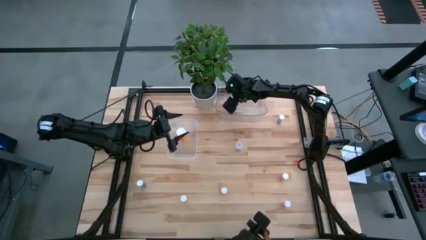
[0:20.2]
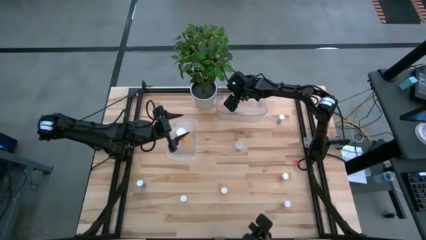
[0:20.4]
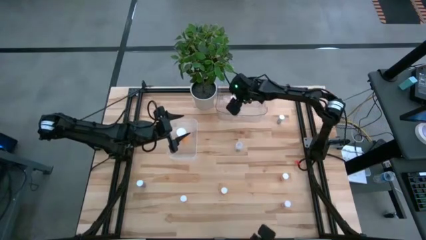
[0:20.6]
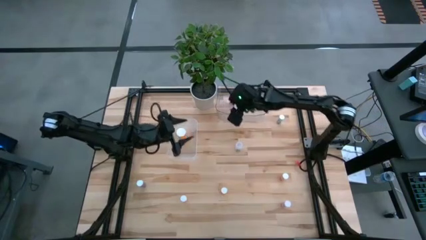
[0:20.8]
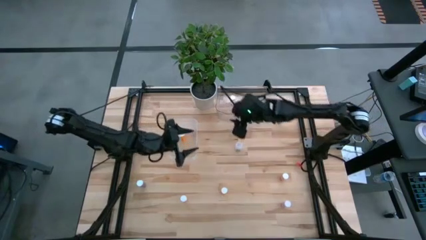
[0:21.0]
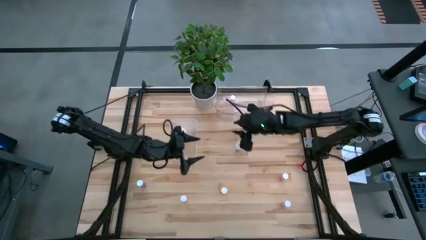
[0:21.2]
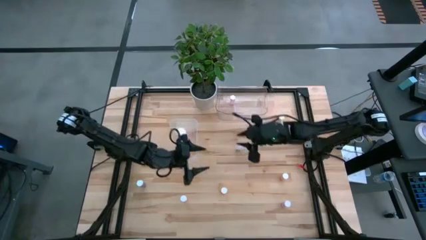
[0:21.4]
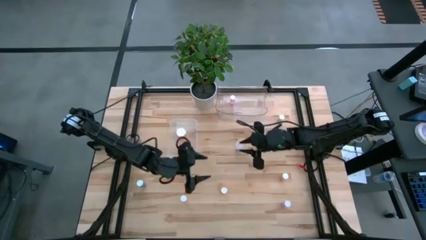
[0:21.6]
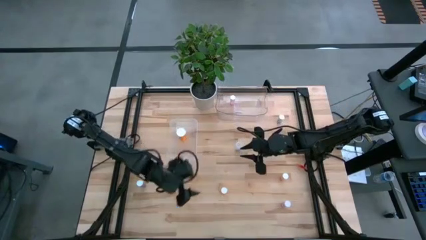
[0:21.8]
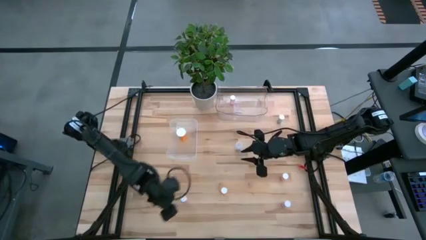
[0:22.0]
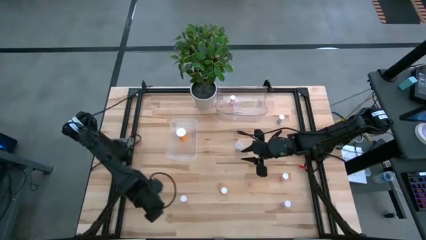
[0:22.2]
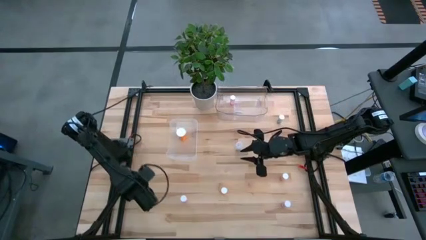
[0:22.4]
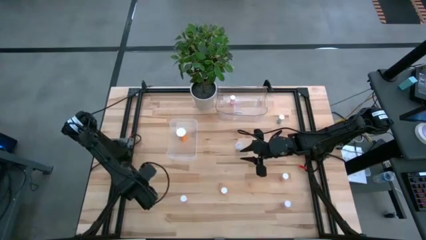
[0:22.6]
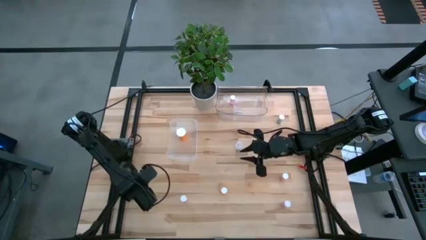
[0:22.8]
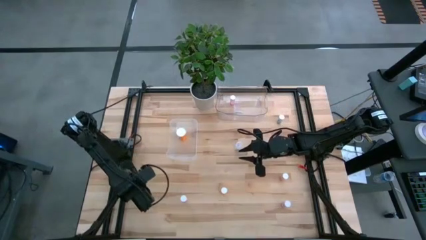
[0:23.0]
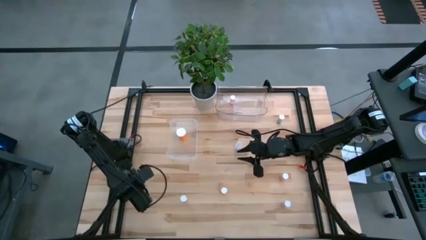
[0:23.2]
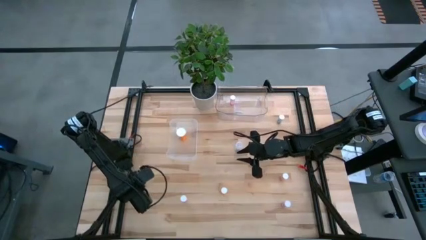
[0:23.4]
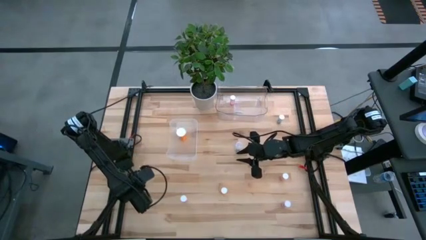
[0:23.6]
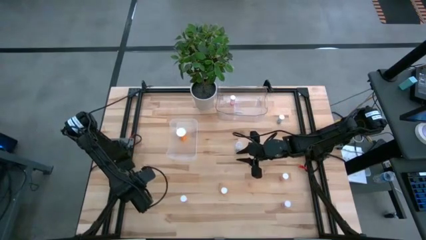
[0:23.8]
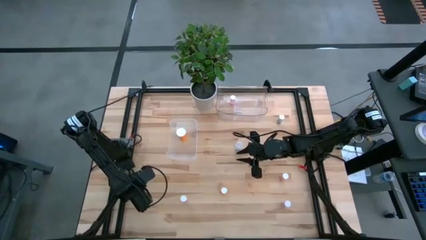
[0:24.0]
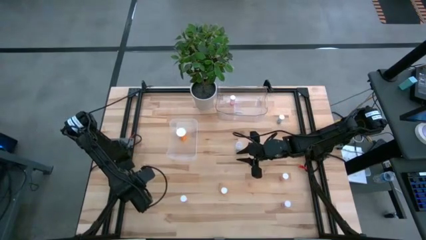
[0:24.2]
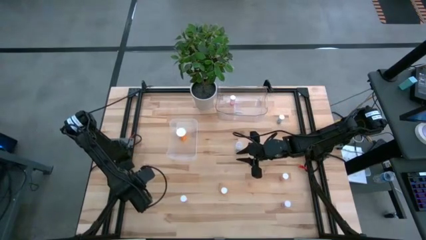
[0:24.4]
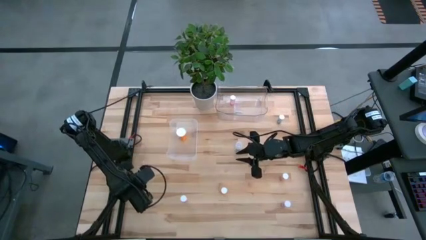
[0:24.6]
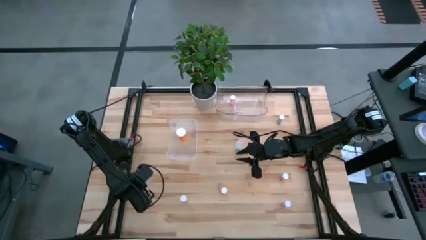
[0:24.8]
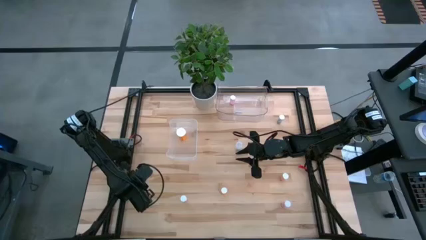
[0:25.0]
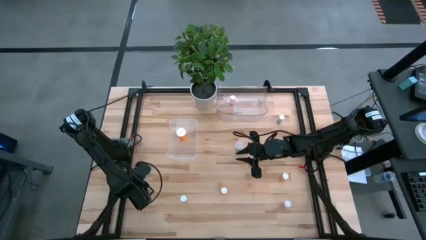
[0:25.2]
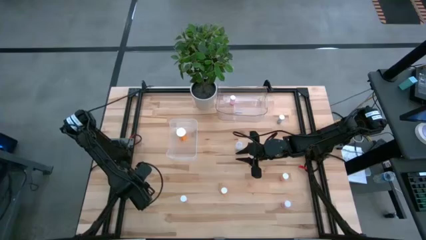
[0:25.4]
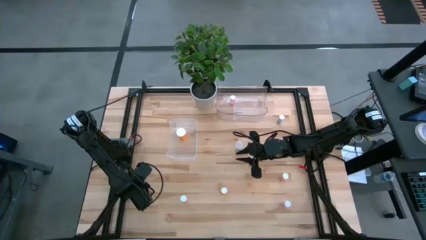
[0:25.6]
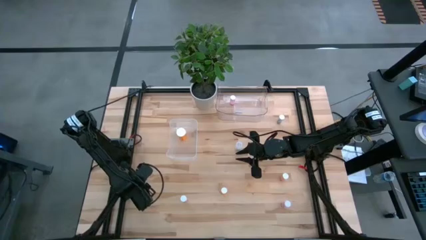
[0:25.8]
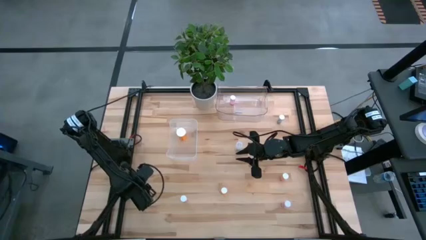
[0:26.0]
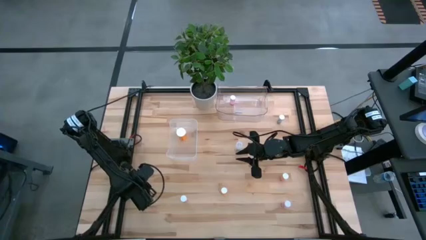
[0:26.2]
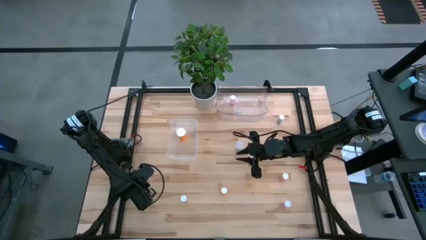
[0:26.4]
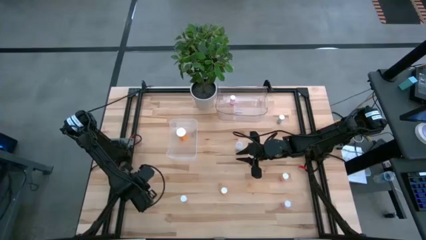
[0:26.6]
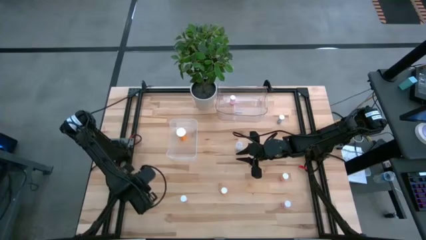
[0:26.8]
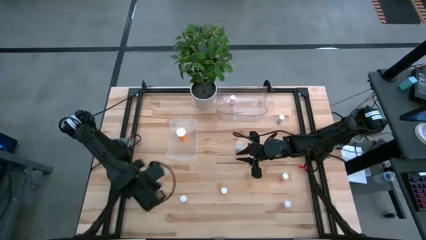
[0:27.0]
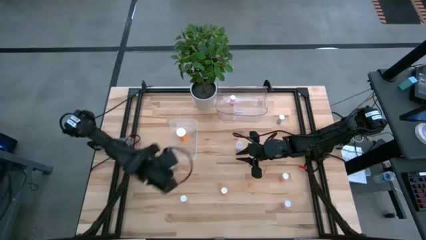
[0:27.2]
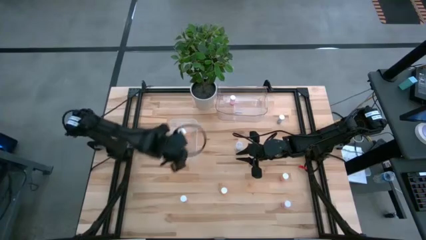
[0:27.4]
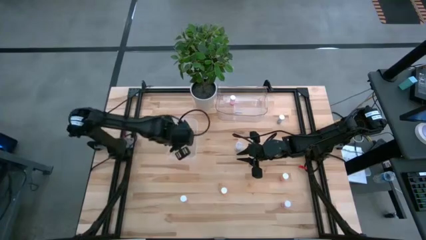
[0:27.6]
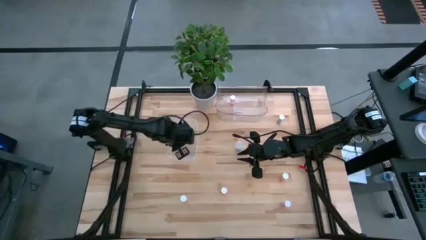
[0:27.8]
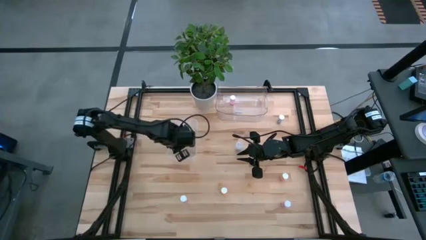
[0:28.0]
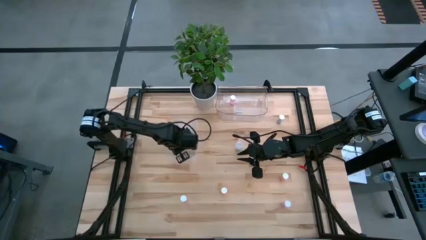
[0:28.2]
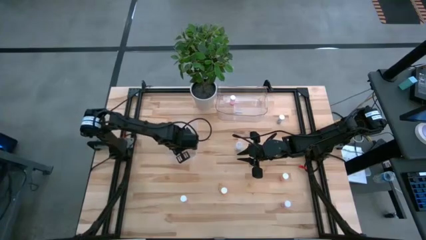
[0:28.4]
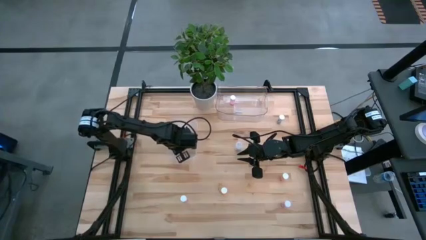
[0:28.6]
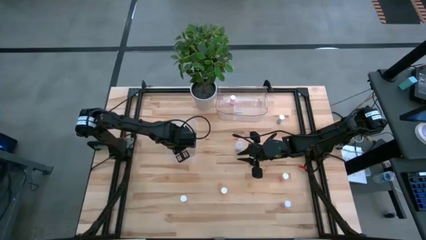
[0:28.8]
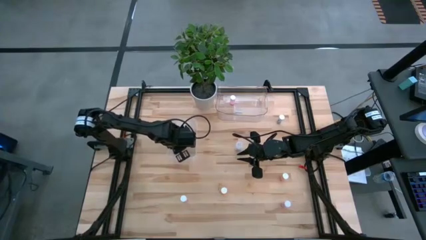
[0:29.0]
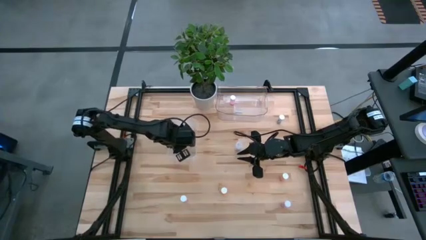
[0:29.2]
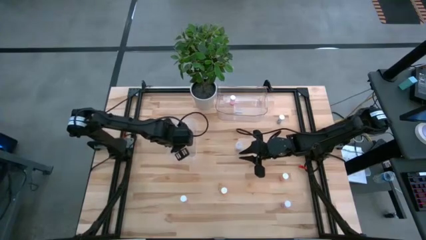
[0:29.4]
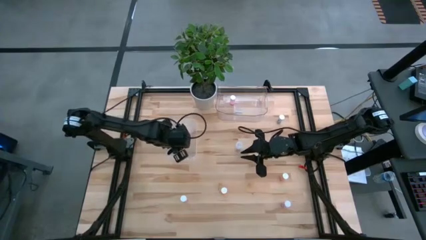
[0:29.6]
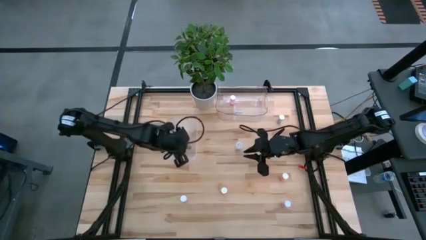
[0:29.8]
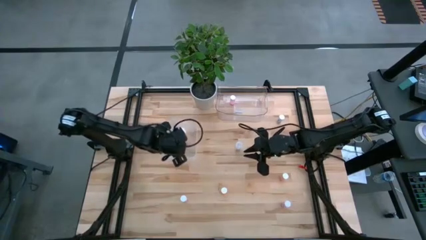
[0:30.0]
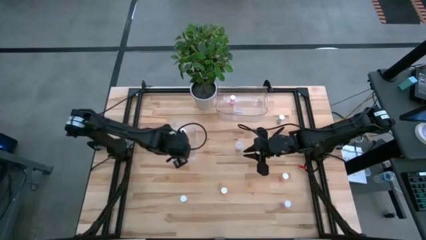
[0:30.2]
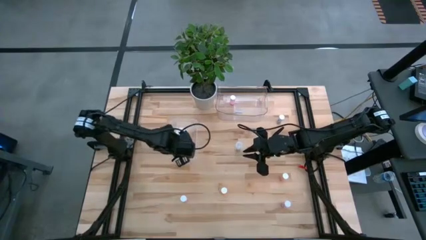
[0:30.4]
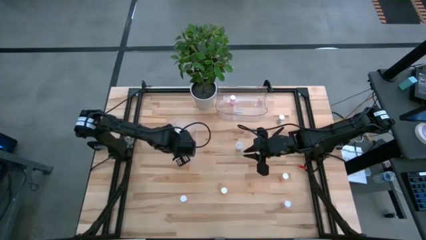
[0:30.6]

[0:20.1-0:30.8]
Task: Pick and place medicine bottles into bin by pill shape (circle, oval)
Put the bottom blue pill bottle into the bottom transparent bin

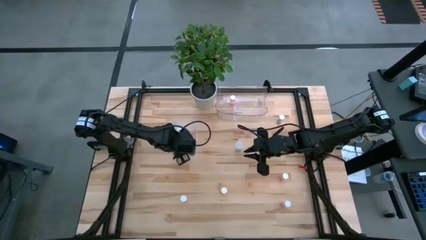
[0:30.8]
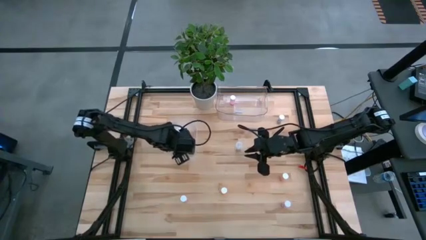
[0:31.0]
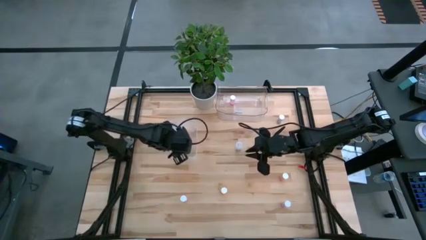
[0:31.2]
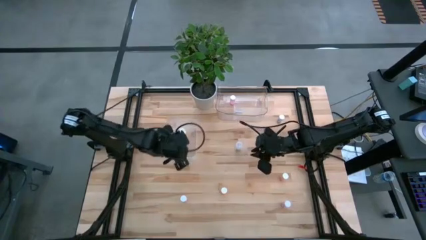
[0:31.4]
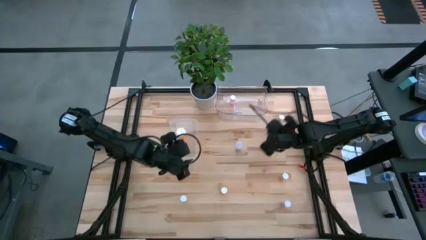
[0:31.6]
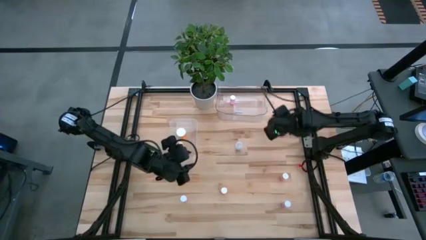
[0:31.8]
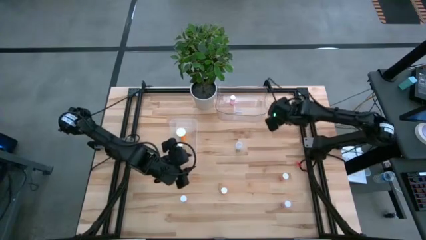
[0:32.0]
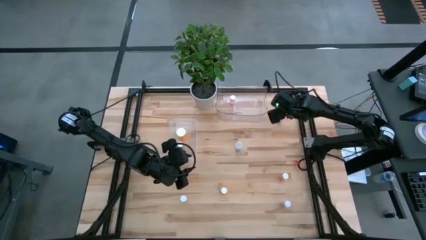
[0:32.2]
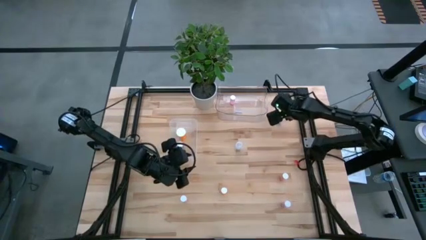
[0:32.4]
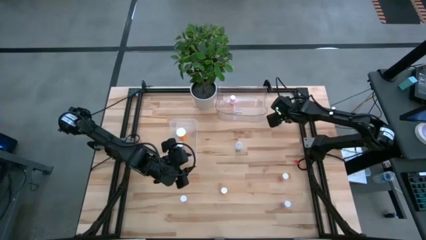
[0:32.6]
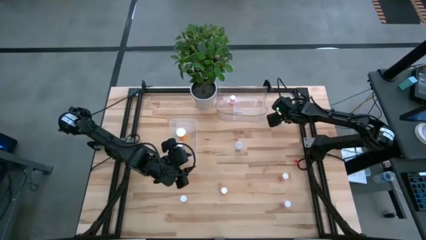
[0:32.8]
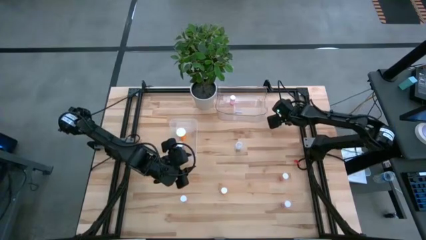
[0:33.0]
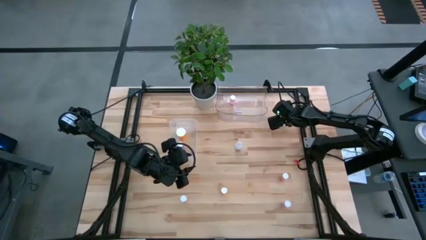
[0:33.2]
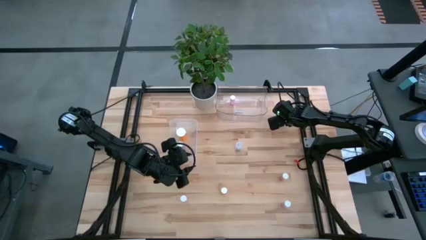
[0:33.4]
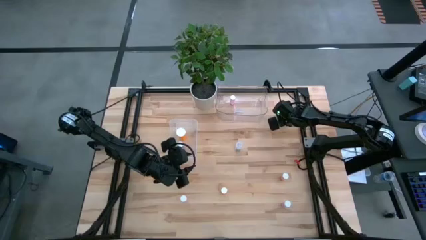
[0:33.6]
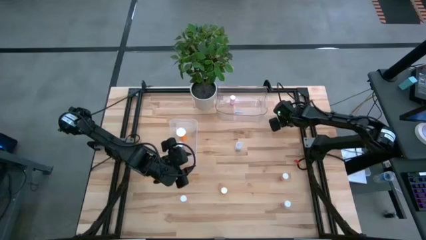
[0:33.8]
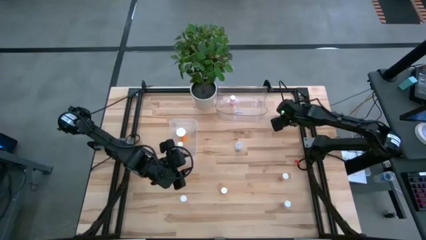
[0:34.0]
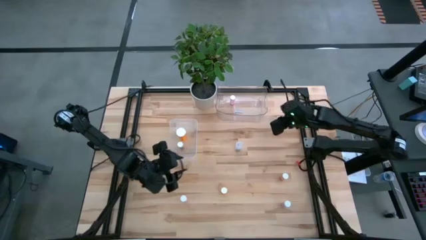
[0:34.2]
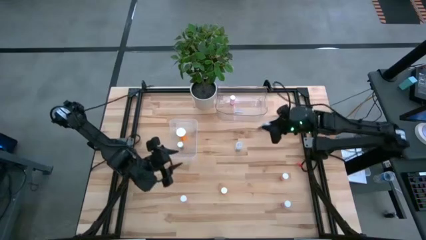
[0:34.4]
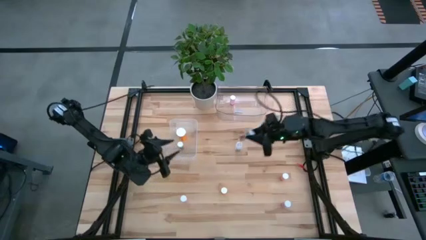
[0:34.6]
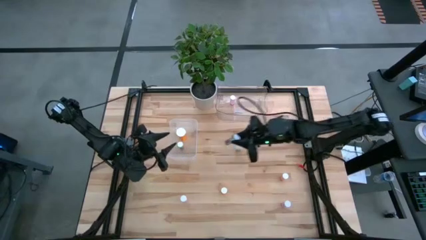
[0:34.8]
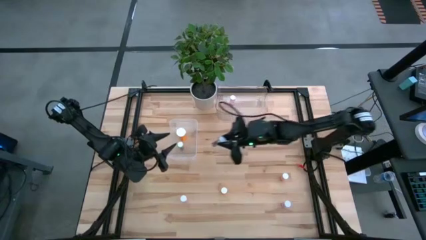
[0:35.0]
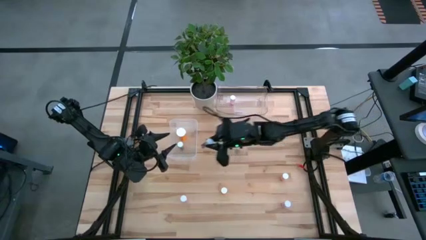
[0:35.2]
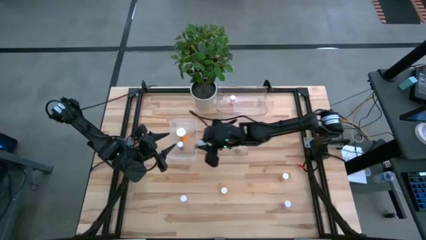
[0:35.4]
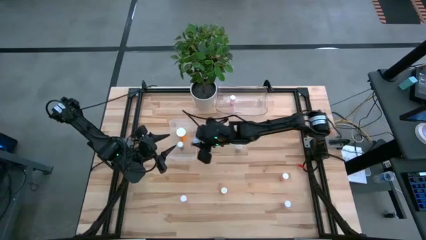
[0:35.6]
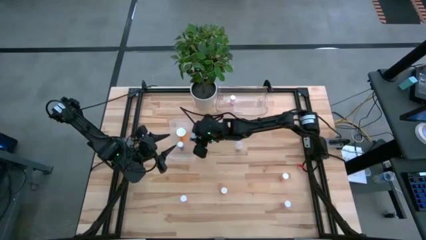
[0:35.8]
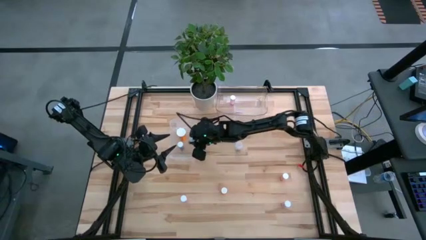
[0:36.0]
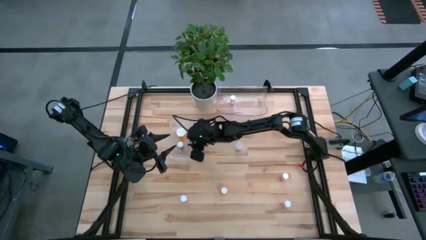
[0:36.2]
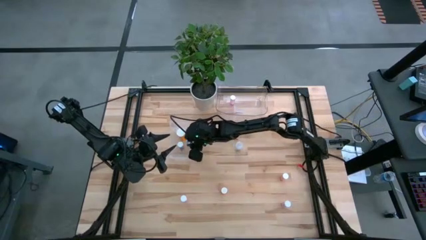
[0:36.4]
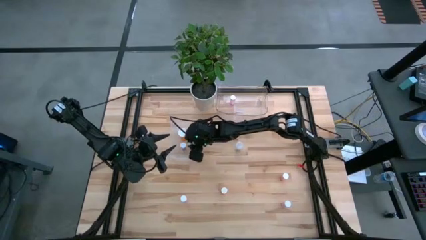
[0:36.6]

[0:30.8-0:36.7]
Put the blue pill bottle into the bottom transparent bin

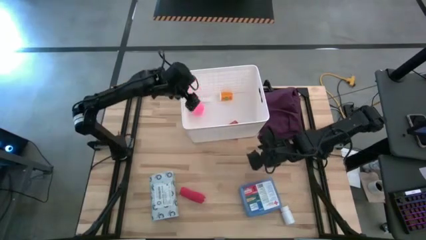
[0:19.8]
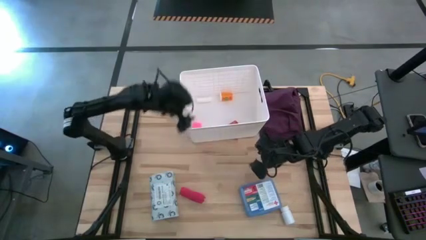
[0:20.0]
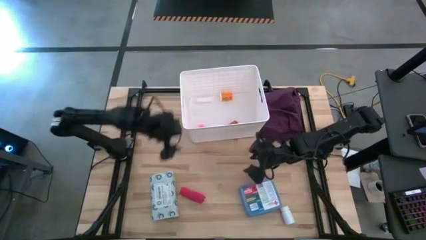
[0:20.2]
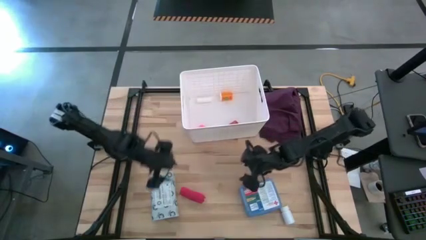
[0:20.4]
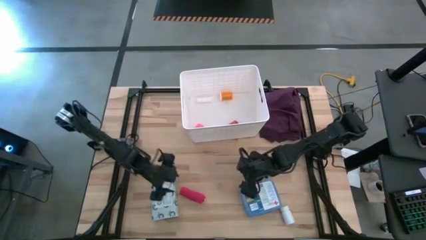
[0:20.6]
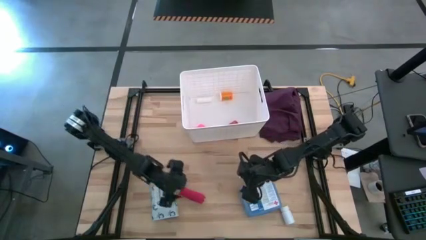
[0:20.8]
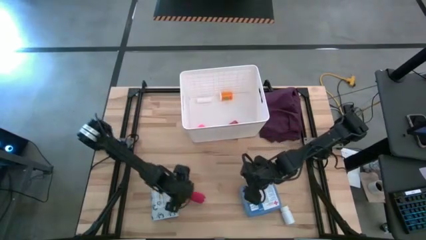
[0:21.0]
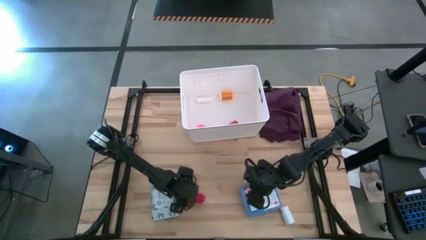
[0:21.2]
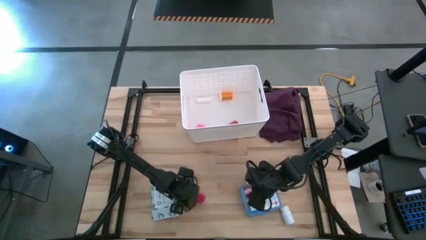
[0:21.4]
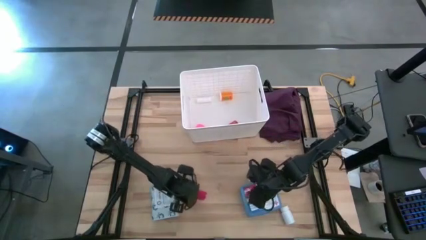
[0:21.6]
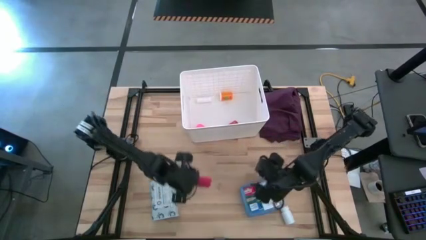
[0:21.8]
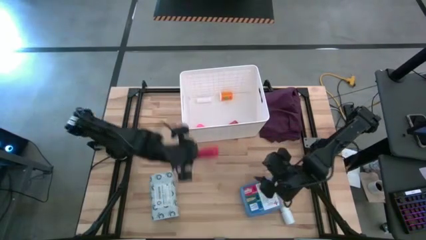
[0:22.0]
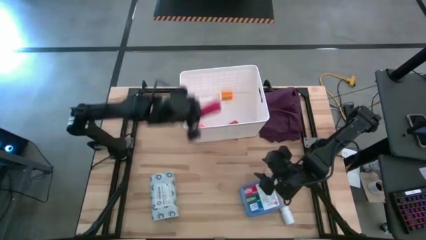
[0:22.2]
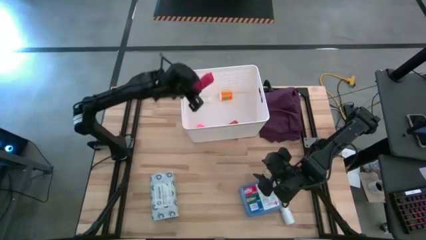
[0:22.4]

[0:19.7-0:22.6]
Task: Pick & place medical supplies in basket/bin
Put the red bandage into the white bin
